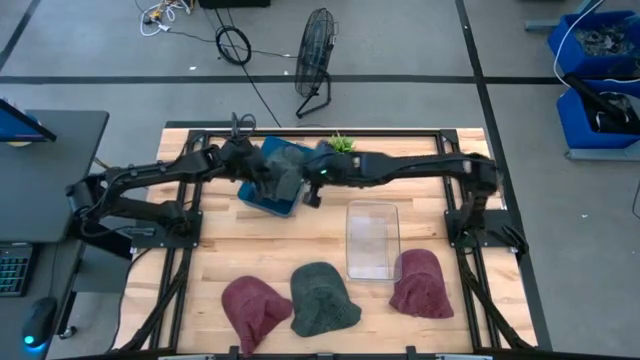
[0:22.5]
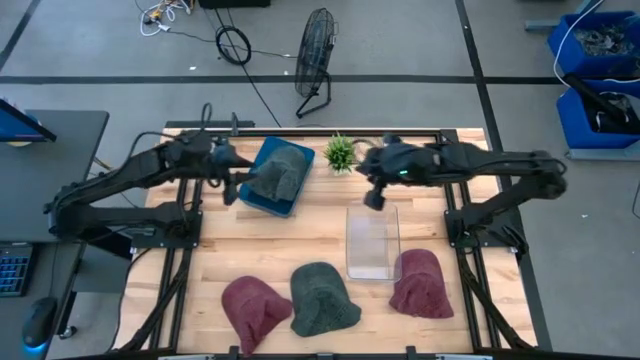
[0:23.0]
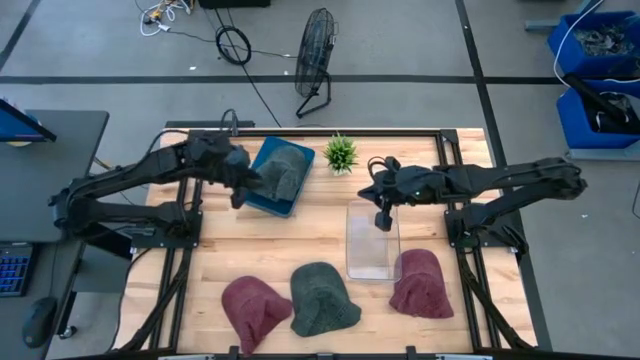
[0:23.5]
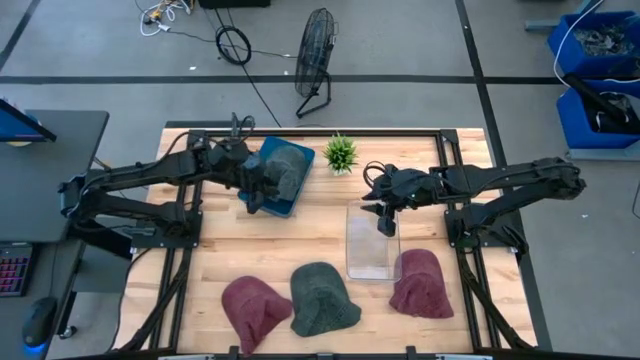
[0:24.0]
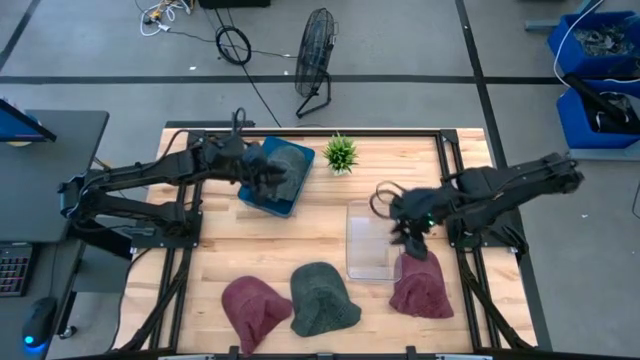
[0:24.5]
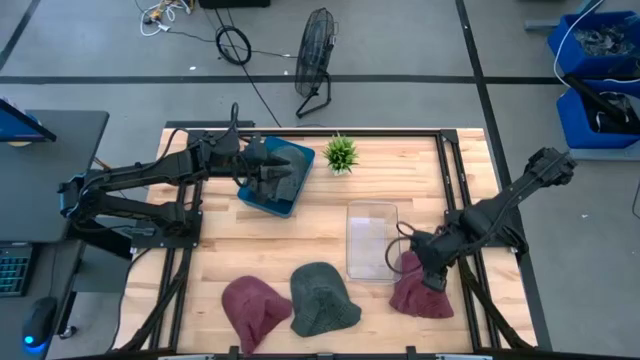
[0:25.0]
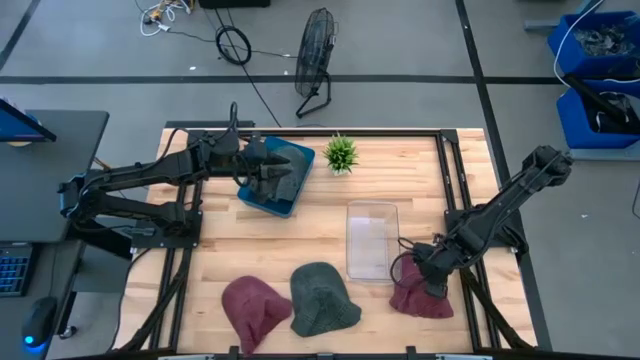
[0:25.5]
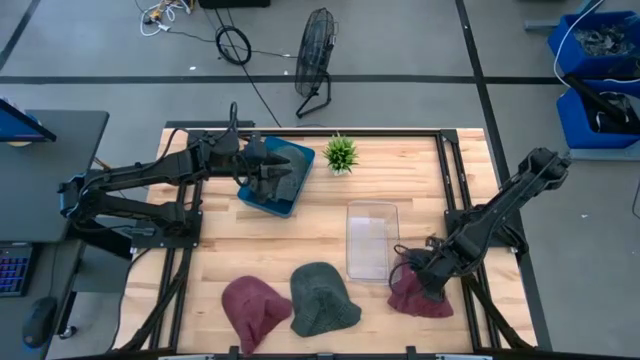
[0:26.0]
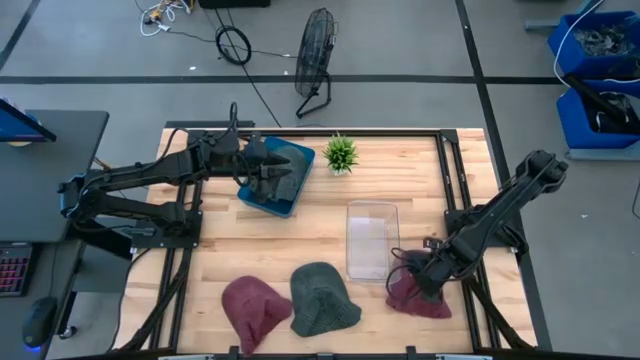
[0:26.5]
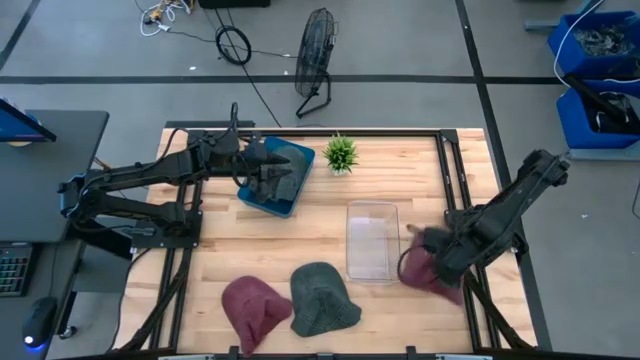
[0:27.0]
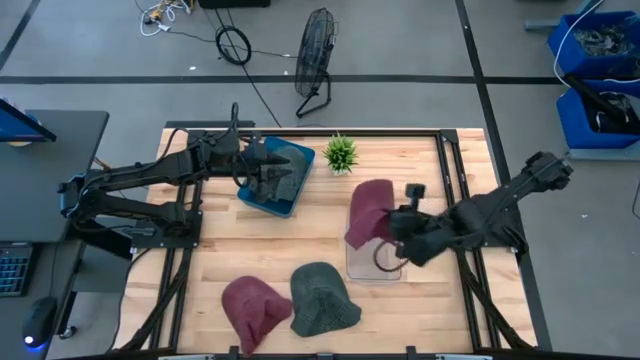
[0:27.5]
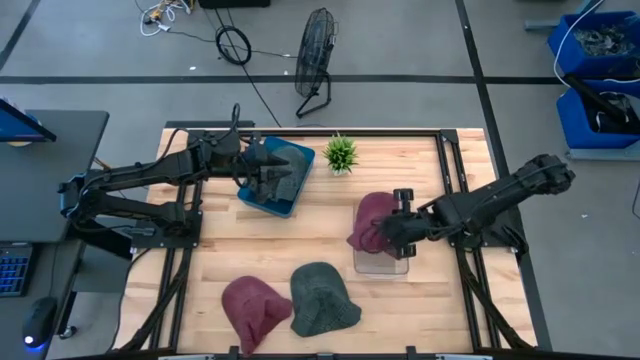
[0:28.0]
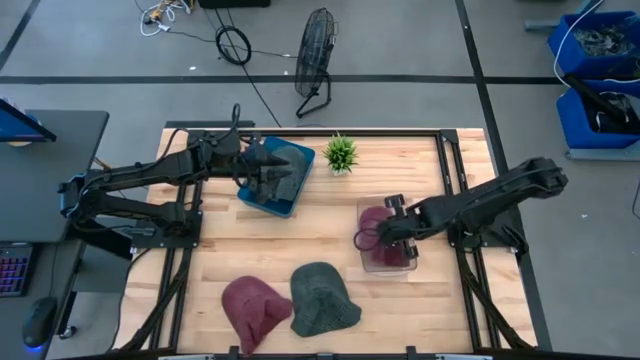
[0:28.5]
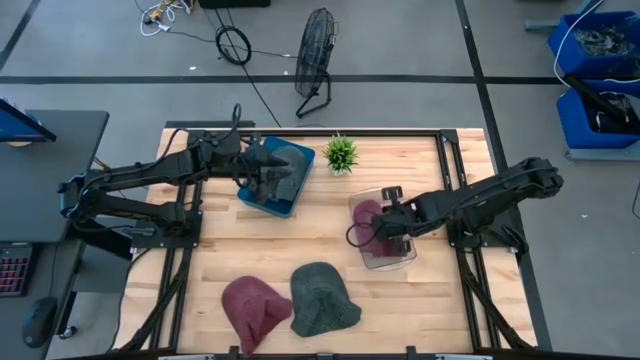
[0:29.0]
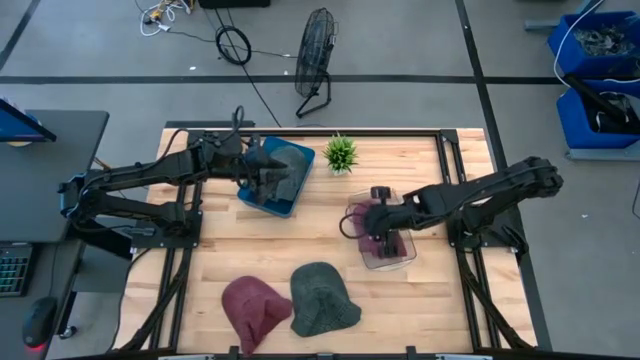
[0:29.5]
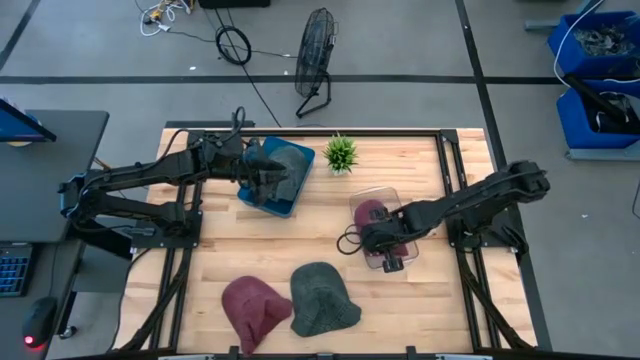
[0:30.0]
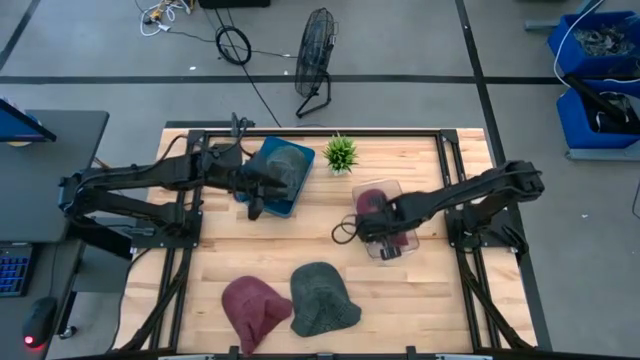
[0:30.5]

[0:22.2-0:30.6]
Task: Pick & Place hat
Put the right red cap into the transparent bin

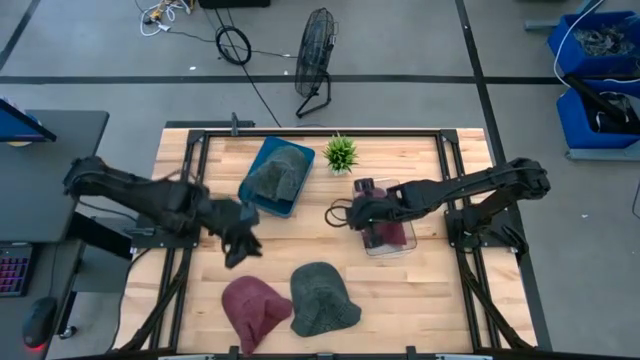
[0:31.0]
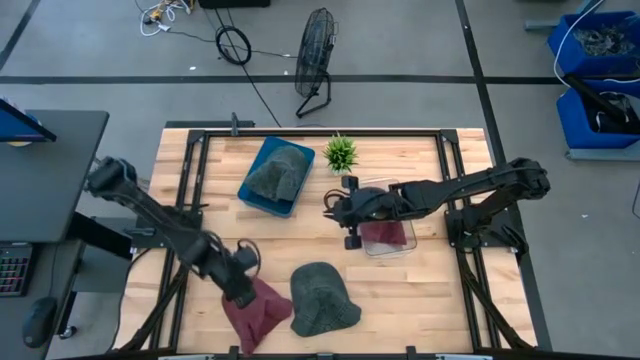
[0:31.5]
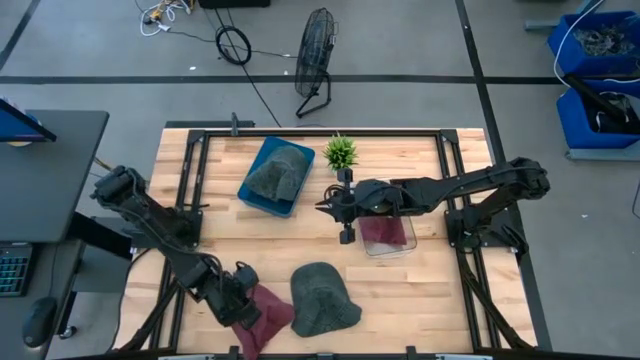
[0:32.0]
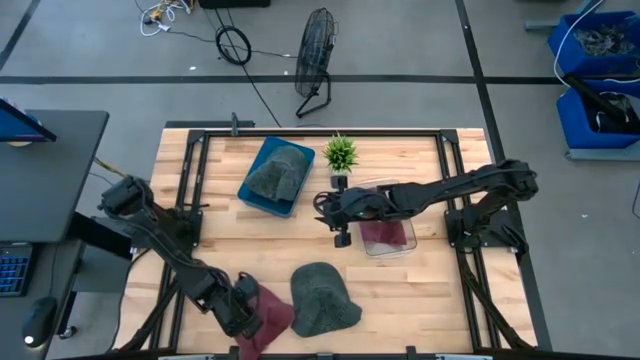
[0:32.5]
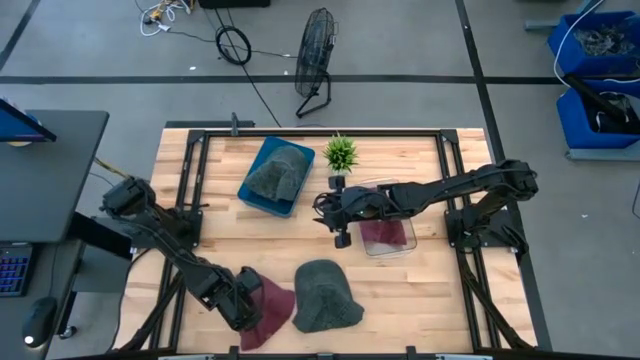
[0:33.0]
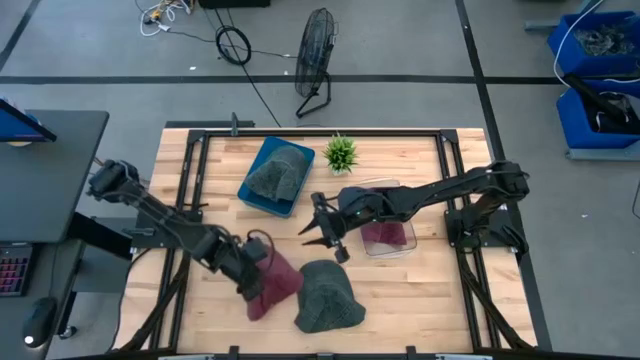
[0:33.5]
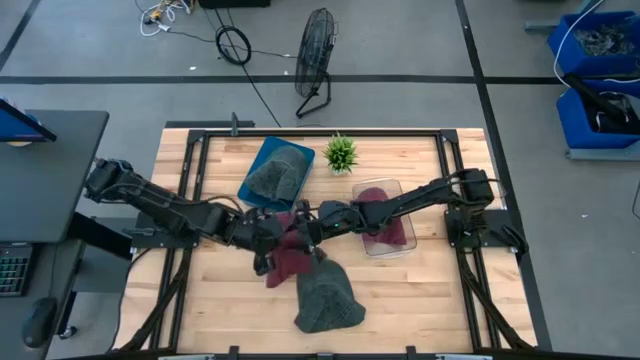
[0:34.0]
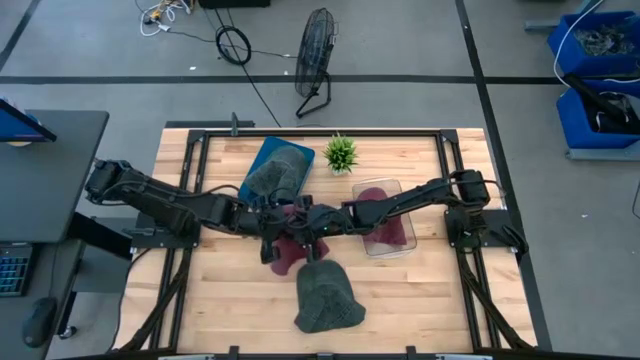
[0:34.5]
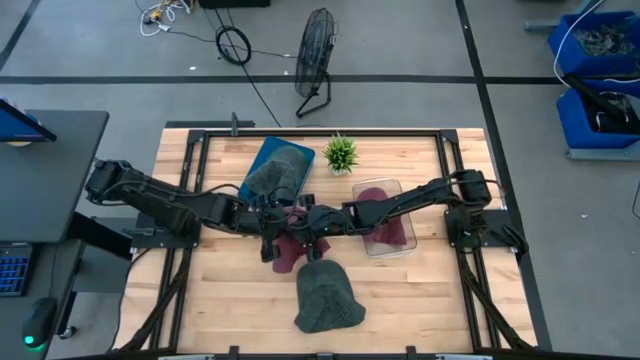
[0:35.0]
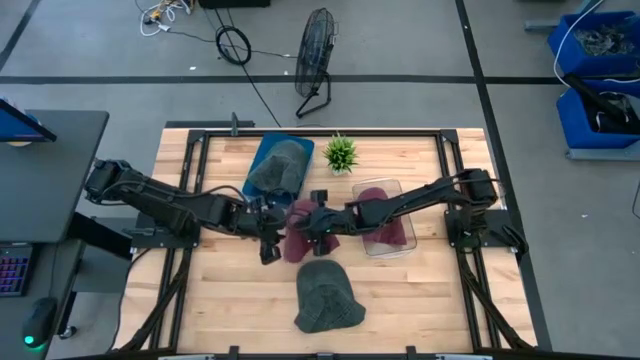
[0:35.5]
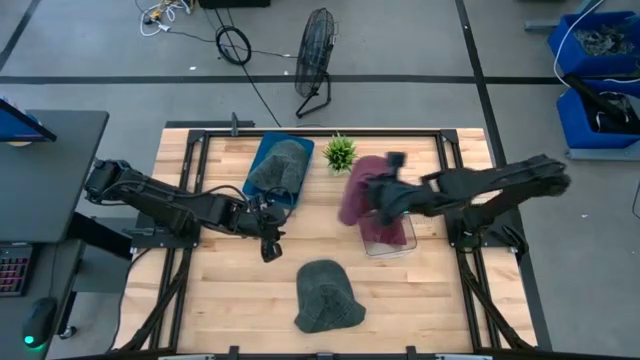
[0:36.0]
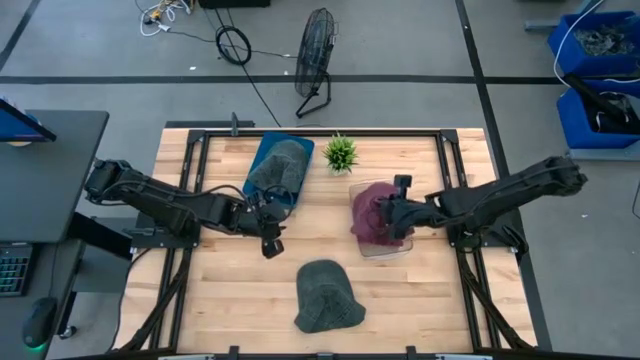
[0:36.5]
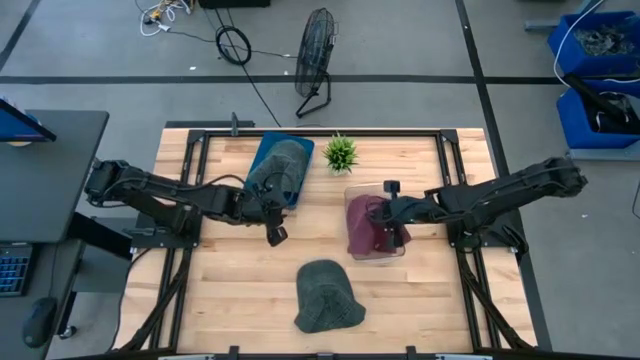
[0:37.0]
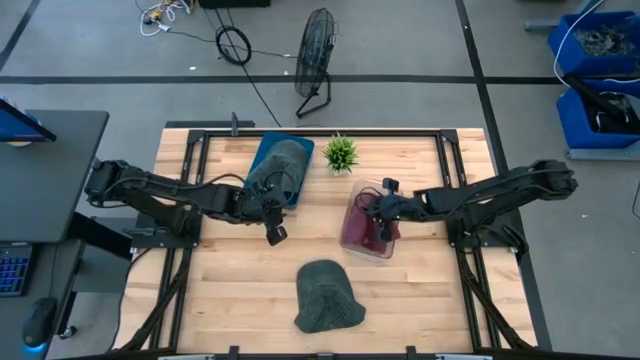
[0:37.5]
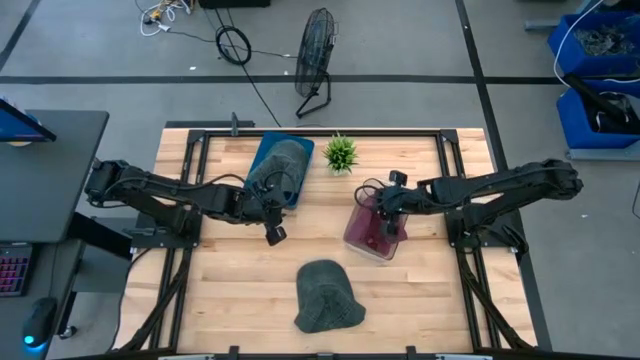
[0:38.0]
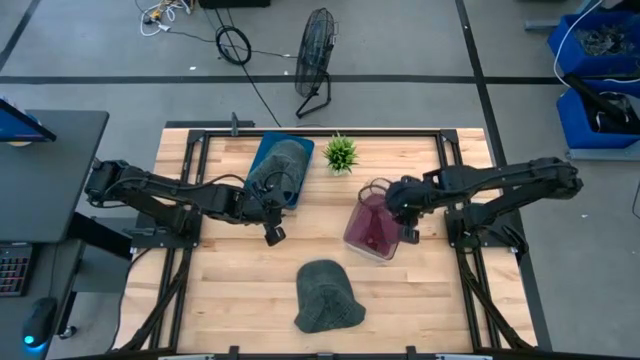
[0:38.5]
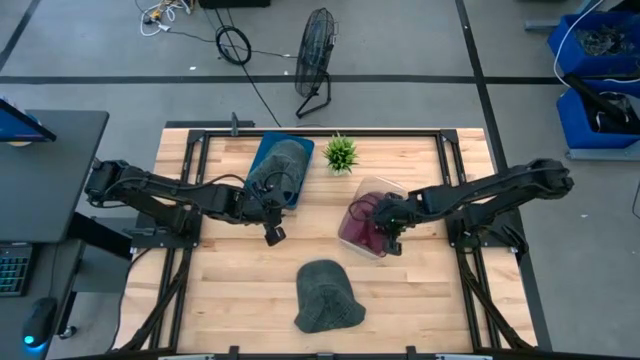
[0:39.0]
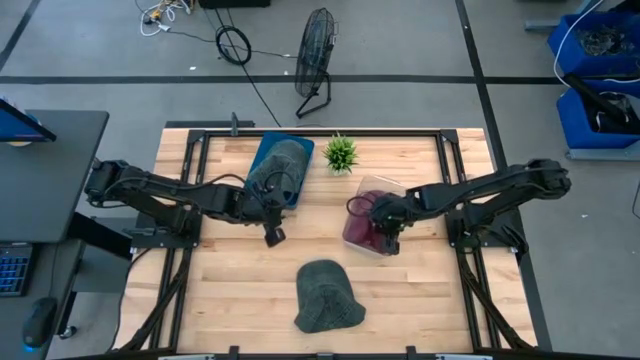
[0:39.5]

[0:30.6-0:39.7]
Put the red cap into the transparent bin

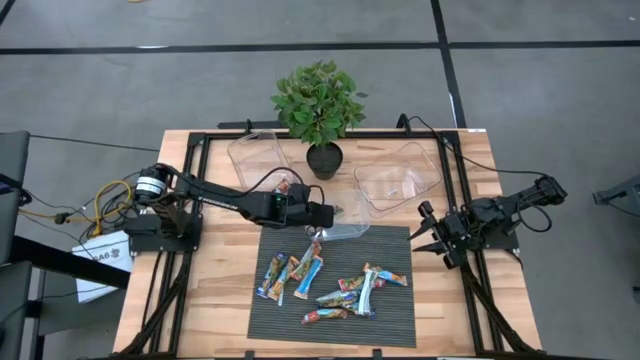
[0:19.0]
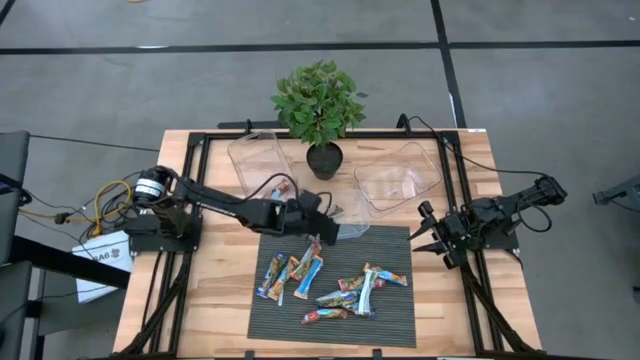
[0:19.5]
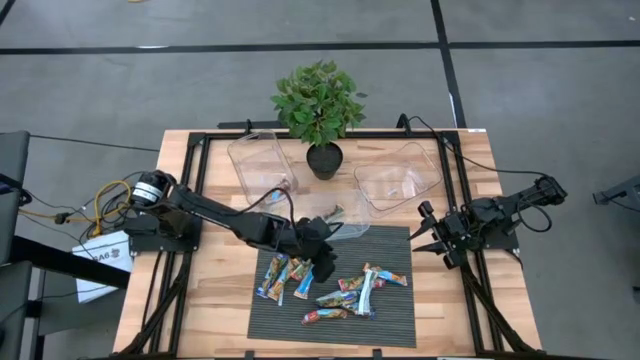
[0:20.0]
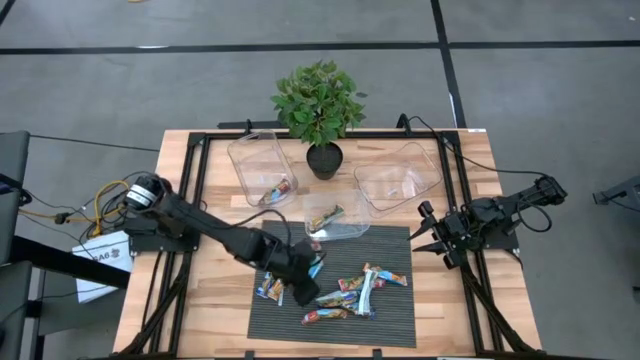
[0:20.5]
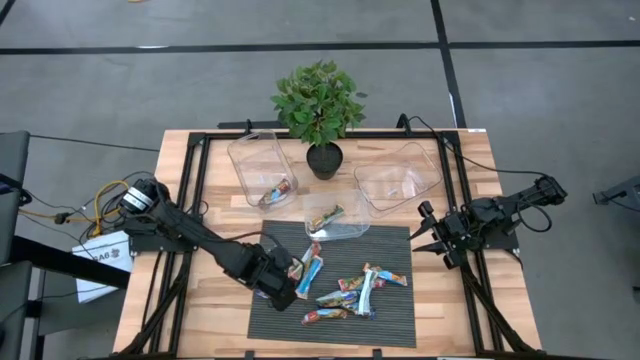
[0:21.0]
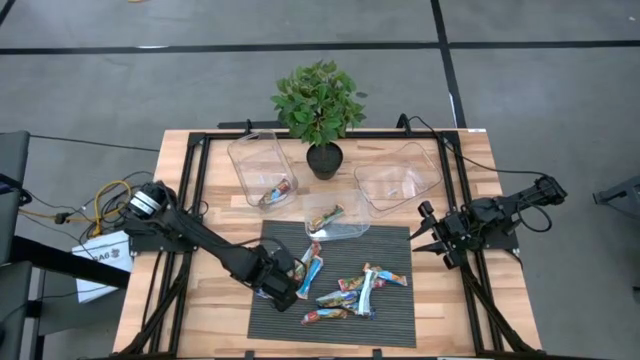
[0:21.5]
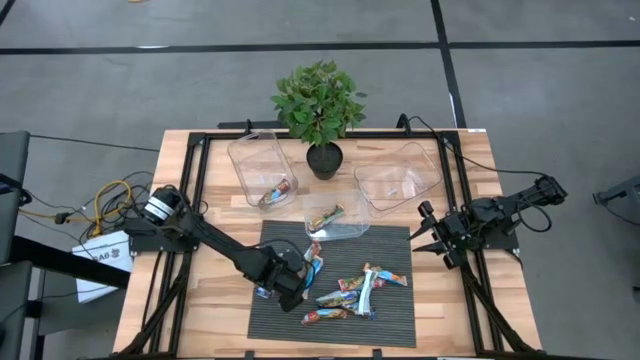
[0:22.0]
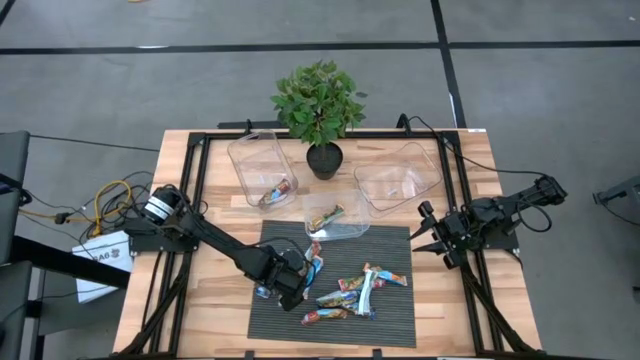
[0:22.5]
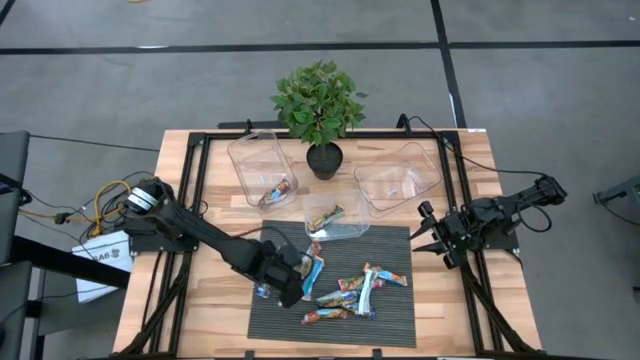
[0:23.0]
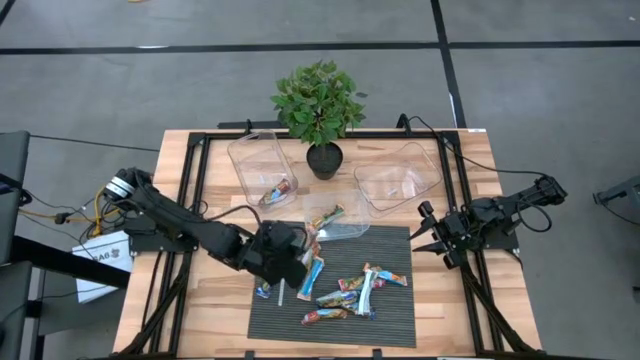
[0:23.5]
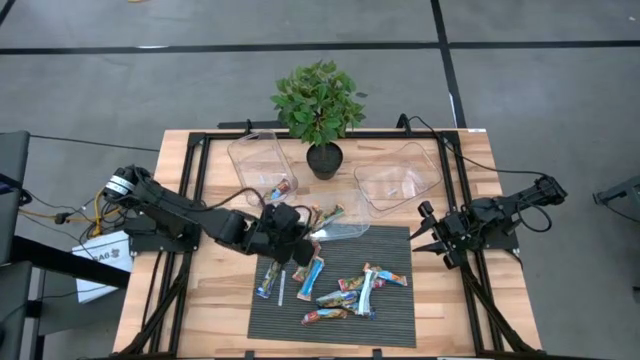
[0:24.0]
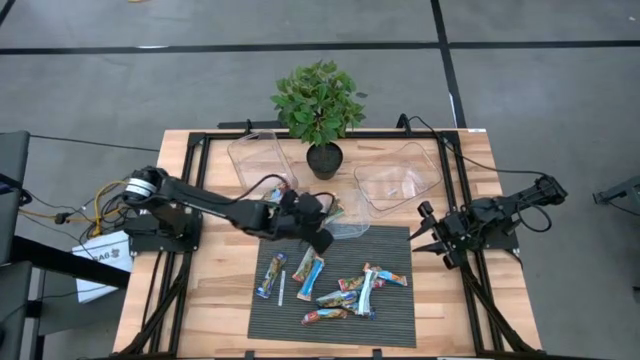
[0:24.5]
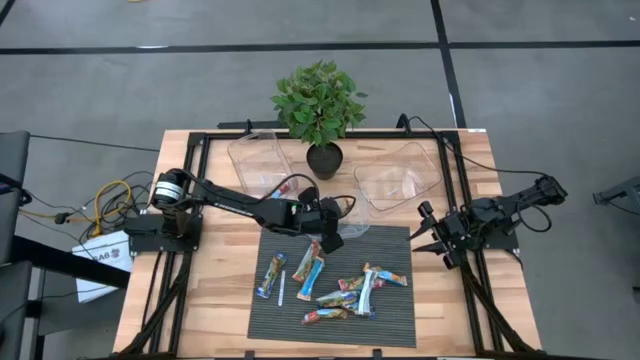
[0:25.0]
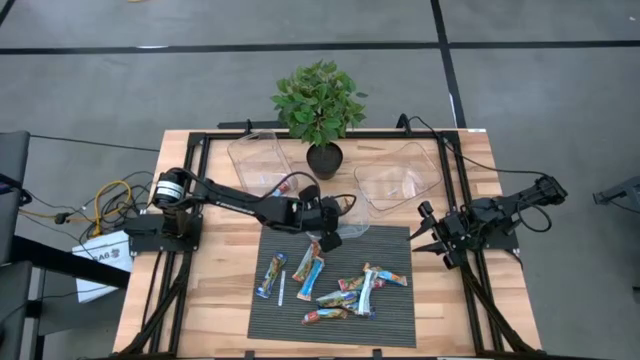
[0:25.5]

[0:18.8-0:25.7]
Task: Pick and place Granola Bars by type
Put the orange granola bar into the middle transparent bin
